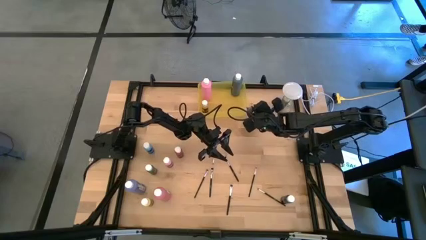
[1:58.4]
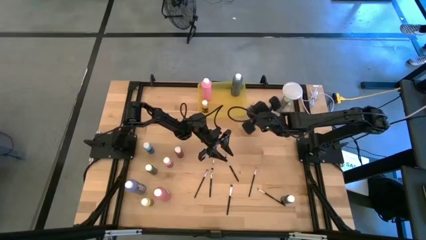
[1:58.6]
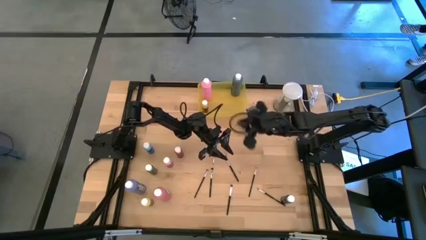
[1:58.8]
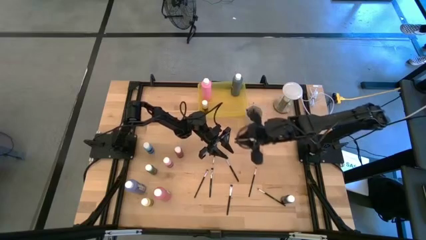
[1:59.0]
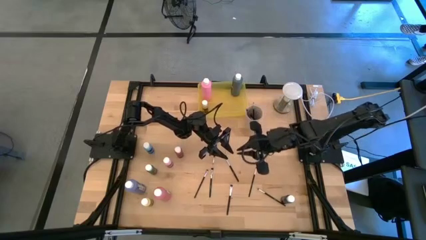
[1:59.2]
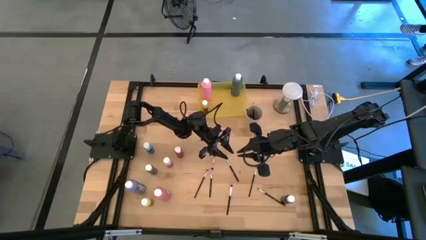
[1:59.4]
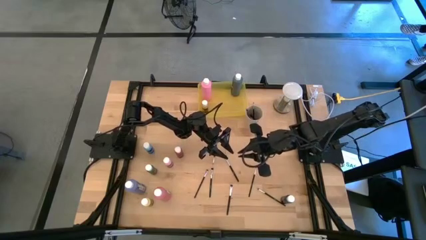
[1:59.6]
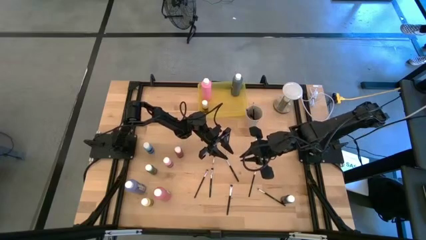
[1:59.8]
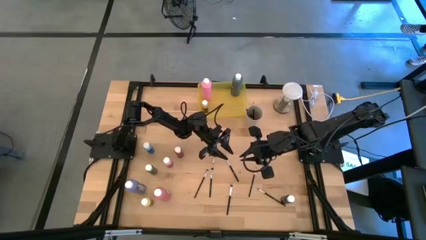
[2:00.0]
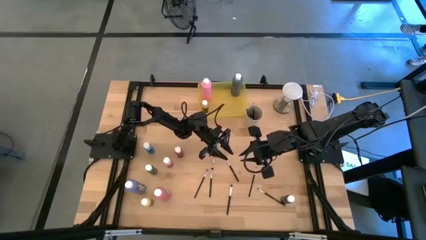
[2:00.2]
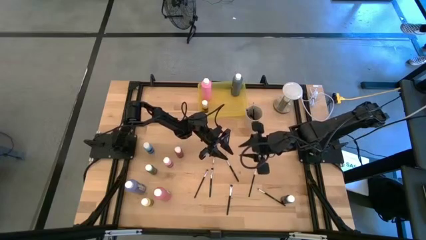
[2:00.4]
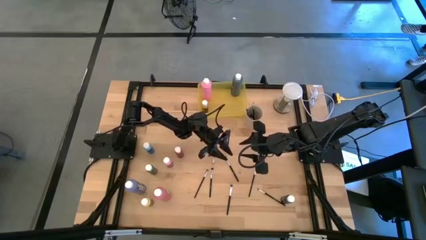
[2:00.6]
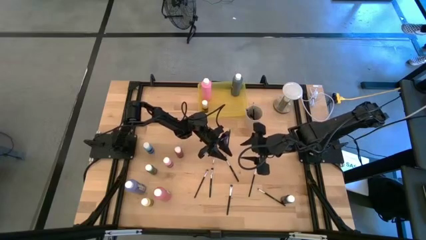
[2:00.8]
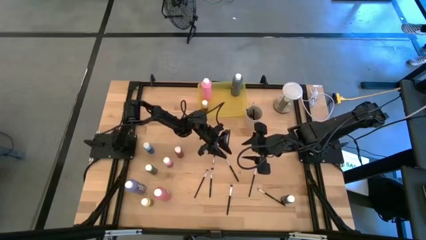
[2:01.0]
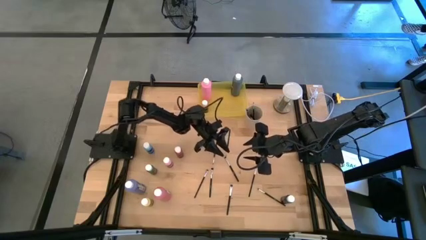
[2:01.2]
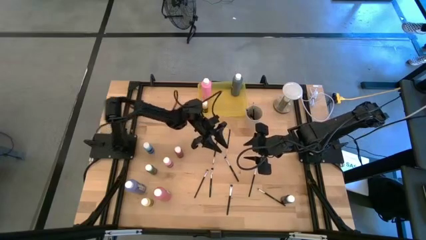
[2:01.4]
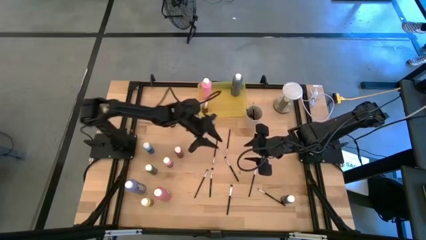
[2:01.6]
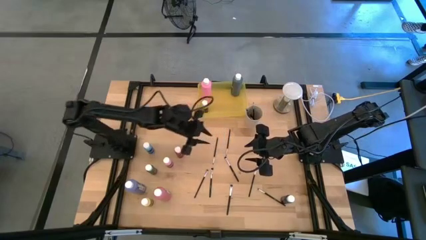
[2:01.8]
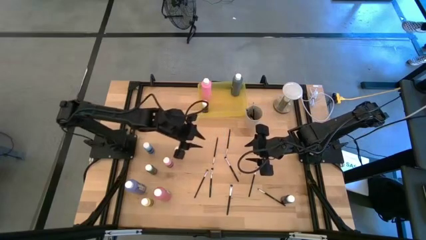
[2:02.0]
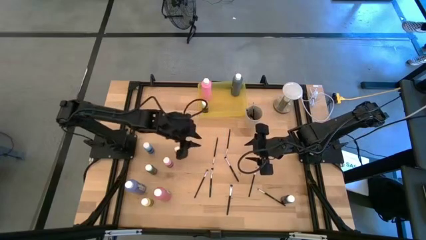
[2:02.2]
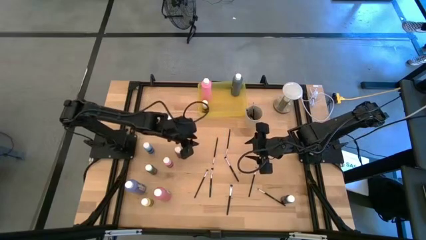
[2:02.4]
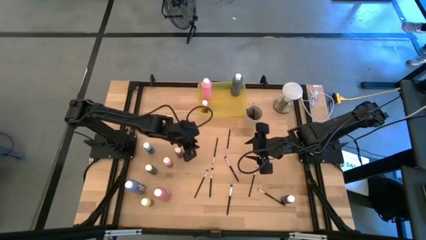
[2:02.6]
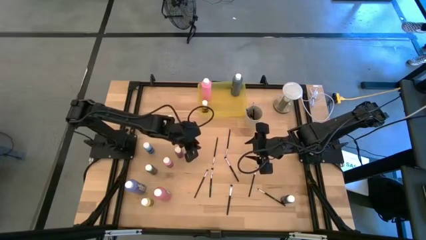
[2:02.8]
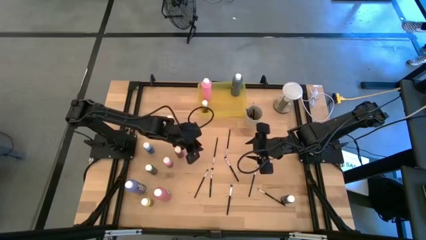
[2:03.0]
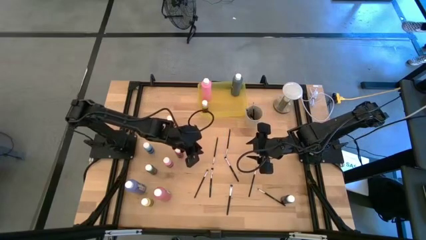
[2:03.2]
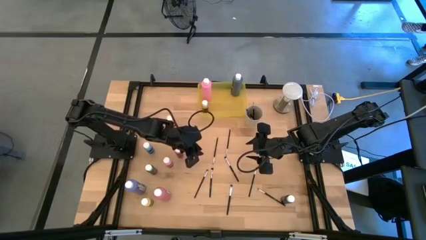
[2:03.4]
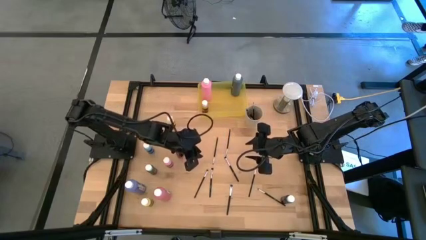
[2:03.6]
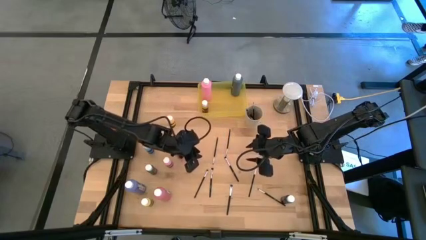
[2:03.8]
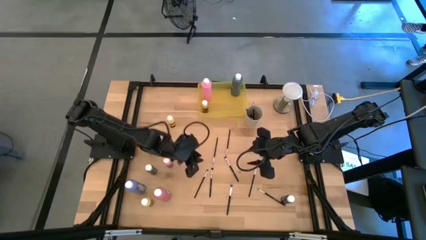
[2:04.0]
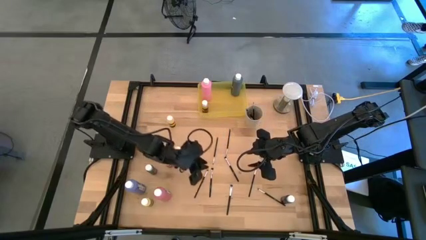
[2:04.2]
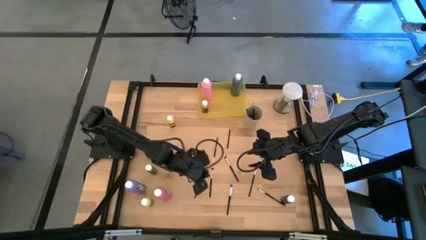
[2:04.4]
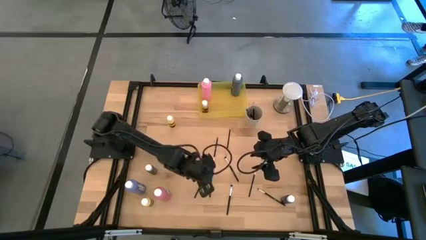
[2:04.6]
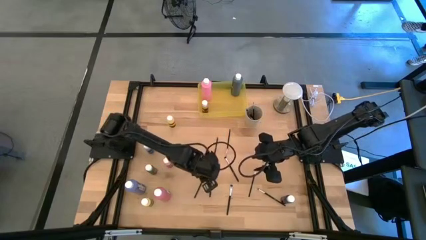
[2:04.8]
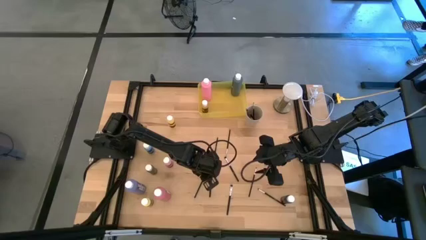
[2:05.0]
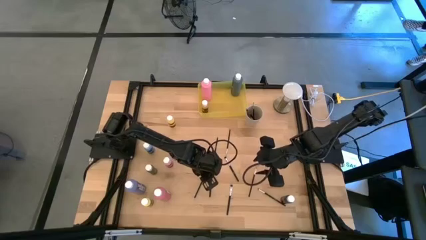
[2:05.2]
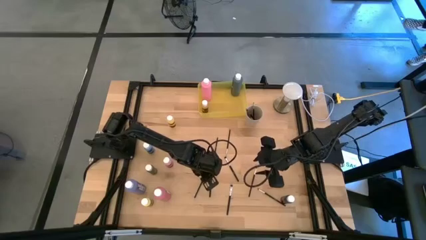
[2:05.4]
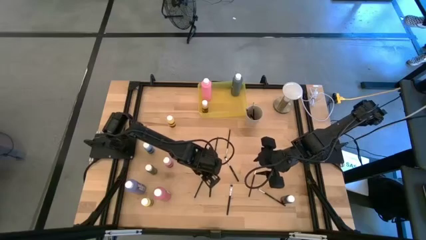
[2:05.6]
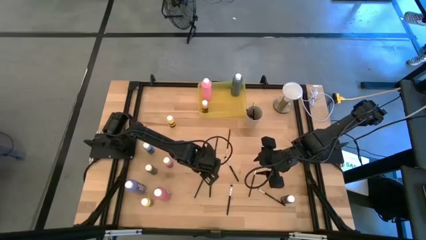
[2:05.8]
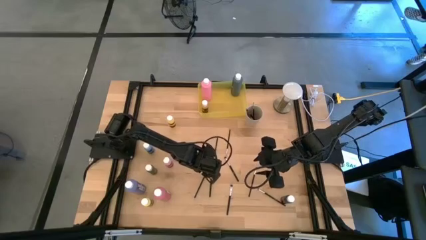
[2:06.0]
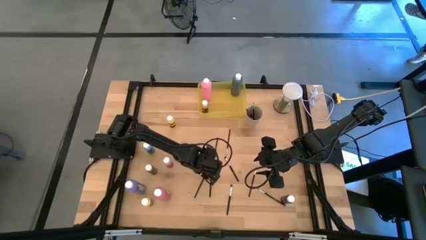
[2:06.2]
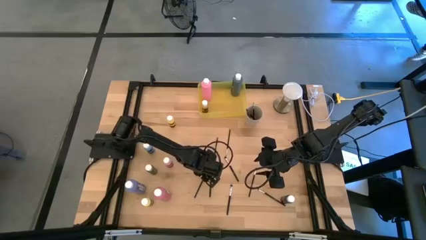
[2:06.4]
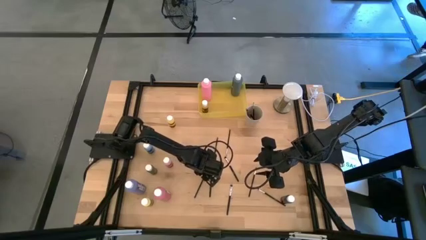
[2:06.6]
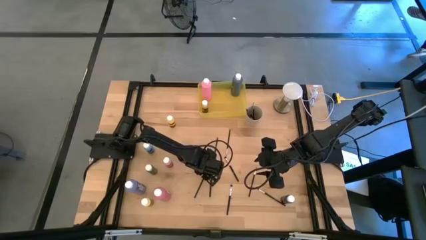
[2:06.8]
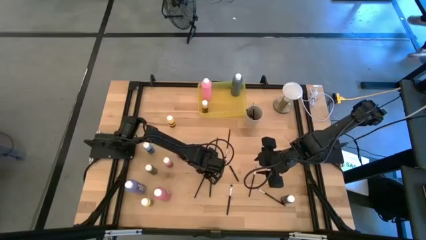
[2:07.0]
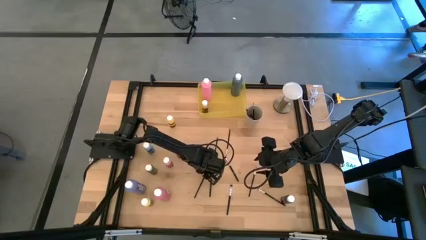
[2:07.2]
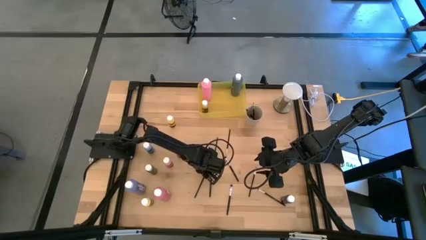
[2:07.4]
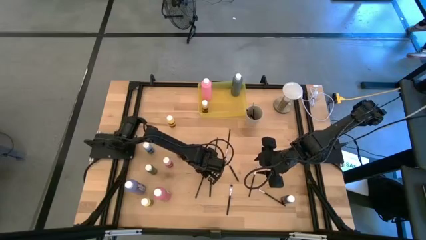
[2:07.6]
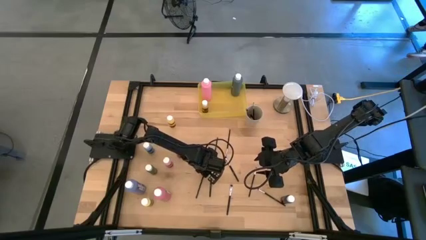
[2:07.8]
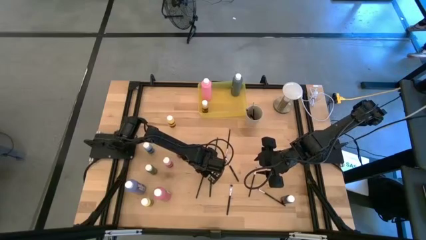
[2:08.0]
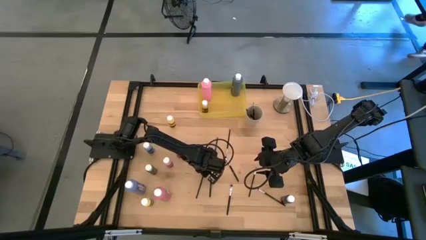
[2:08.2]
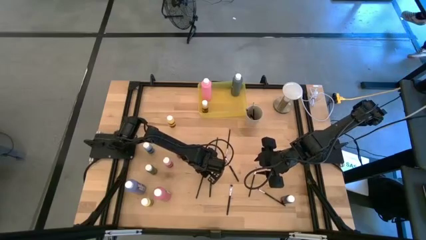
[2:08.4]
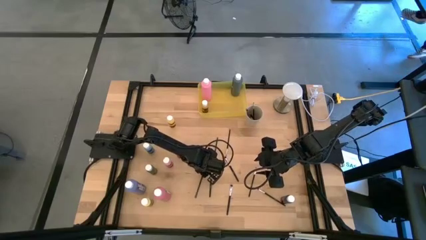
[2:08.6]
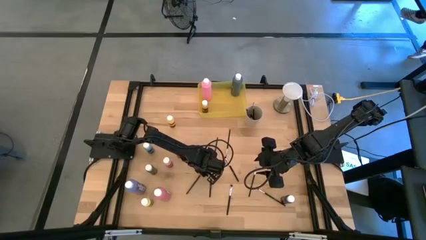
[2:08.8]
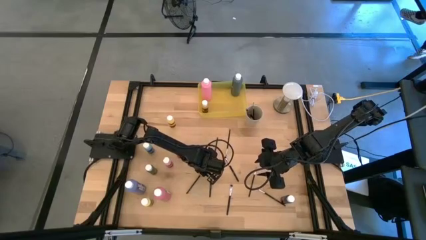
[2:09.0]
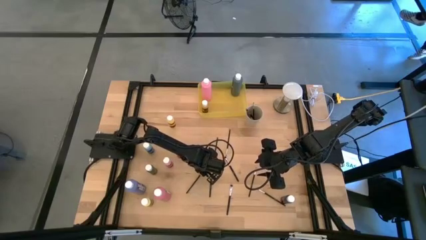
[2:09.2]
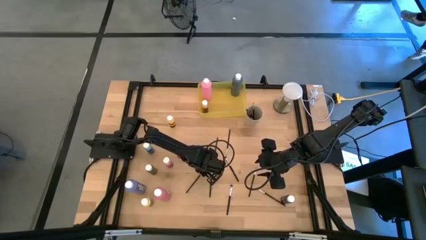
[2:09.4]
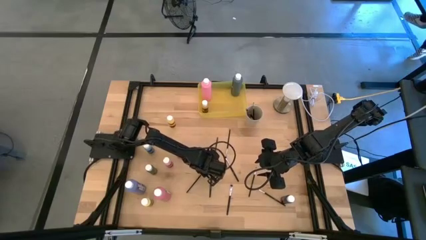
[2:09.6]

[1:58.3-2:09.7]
Task: Pick & Place Paint Supplies
Put the silver paint brush into the white cup

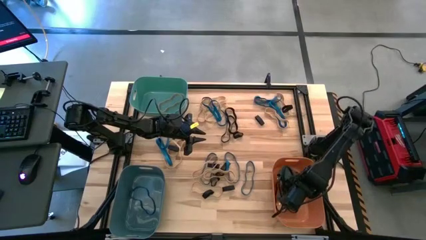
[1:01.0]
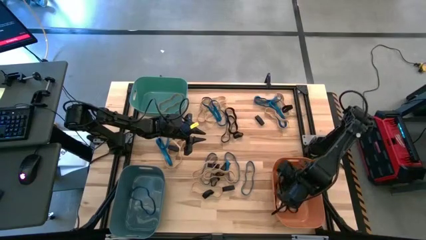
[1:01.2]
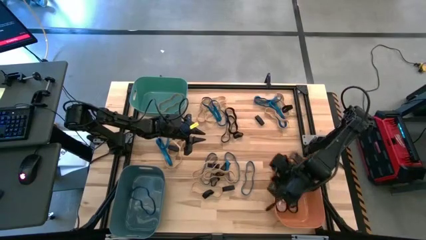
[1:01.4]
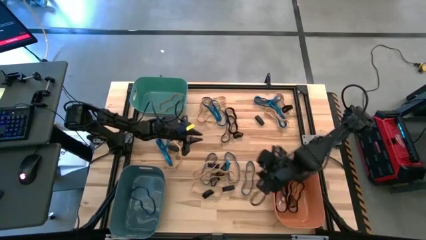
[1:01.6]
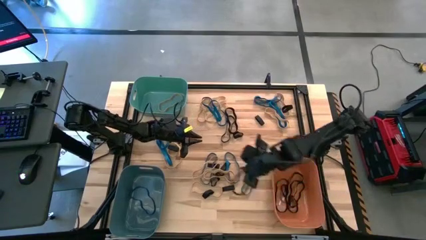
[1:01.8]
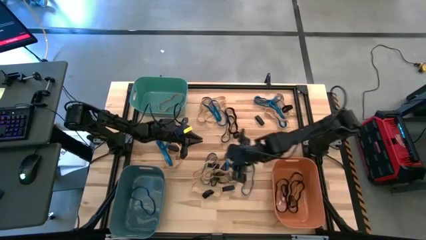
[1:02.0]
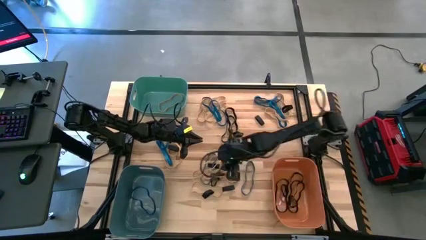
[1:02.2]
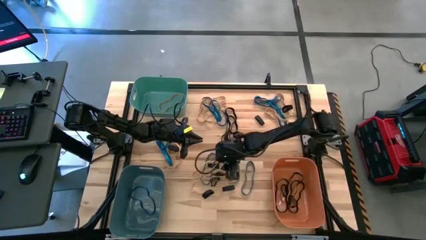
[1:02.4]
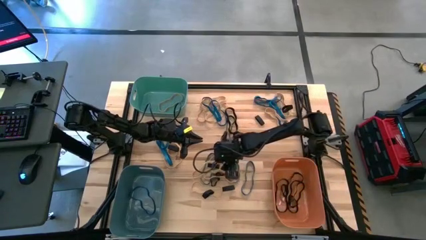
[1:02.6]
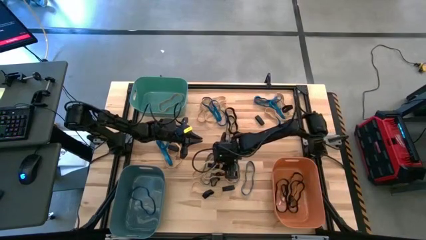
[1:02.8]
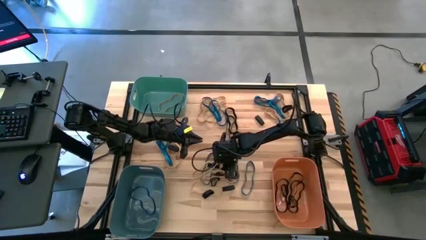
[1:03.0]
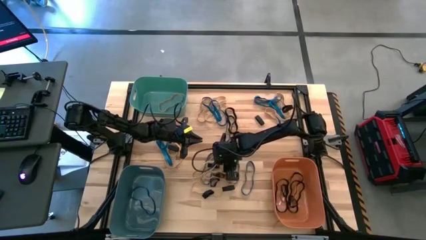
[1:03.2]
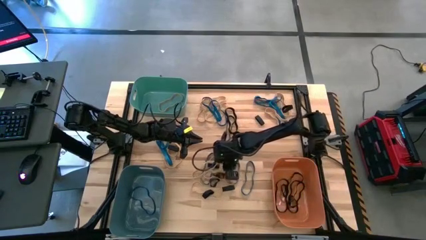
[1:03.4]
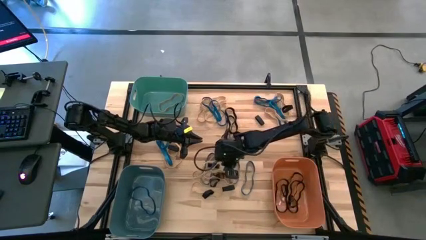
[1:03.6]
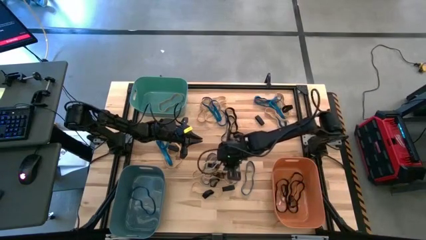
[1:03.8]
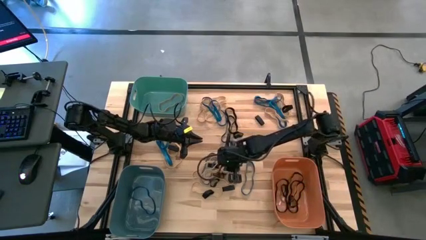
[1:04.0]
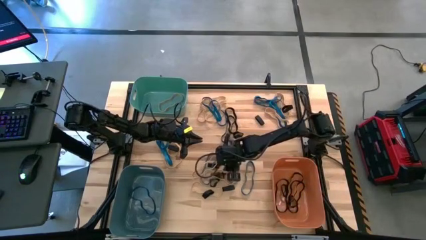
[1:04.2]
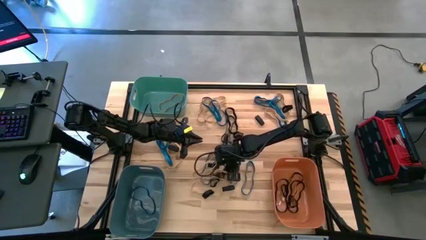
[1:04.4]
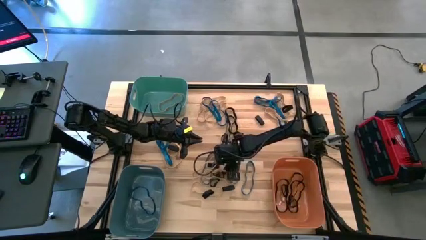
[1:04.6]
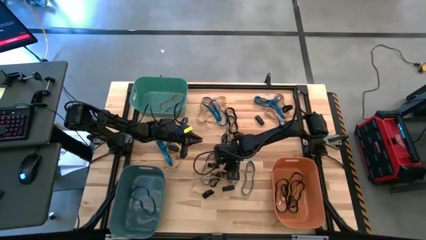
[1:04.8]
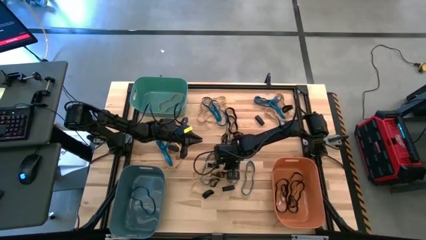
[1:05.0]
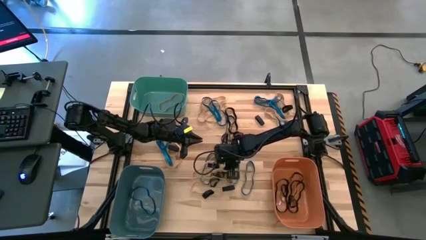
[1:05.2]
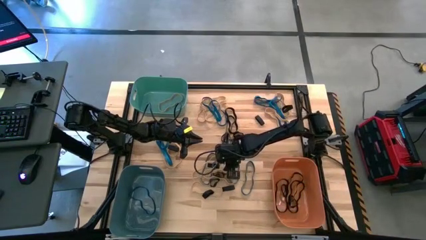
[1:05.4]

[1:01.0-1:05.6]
Task: Sort rubber bands into baskets
Put the black rubber band into the orange bin
